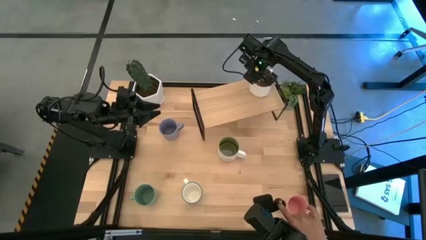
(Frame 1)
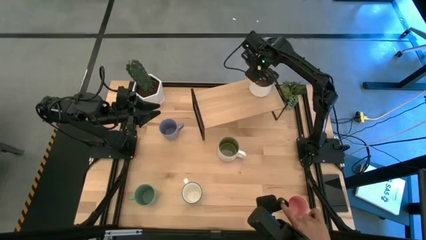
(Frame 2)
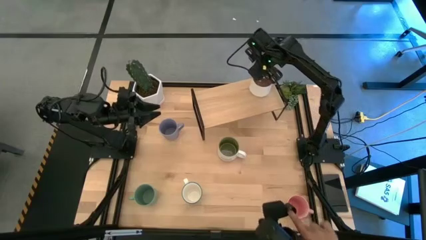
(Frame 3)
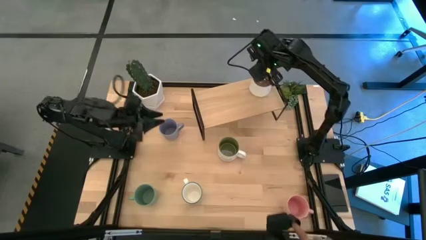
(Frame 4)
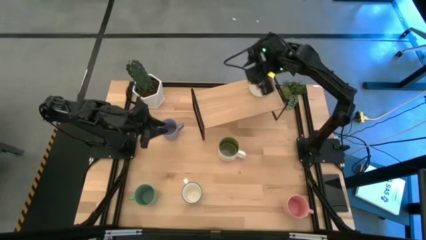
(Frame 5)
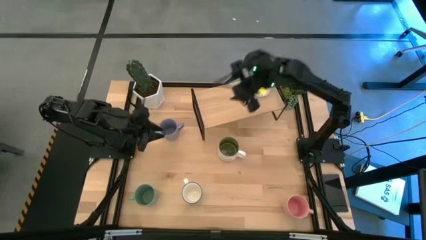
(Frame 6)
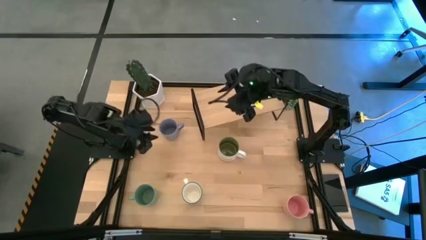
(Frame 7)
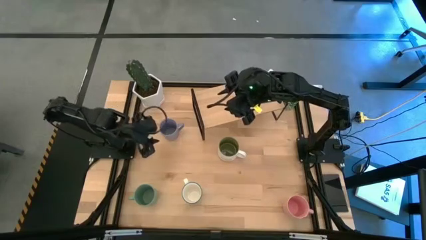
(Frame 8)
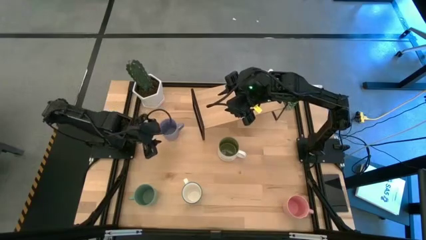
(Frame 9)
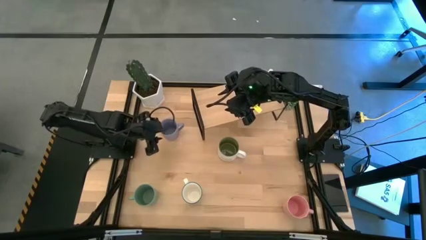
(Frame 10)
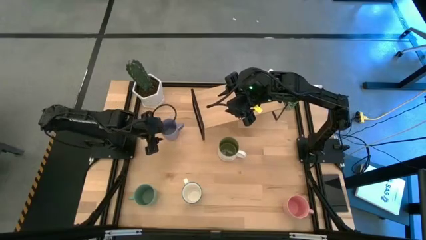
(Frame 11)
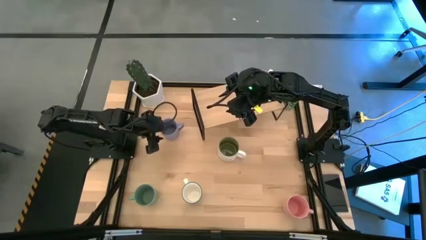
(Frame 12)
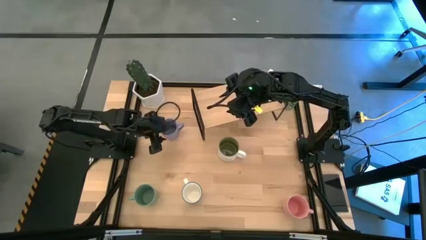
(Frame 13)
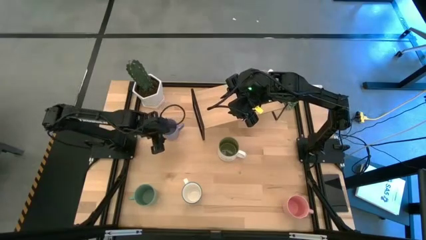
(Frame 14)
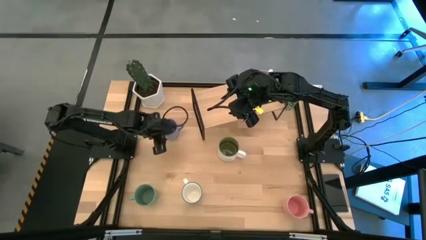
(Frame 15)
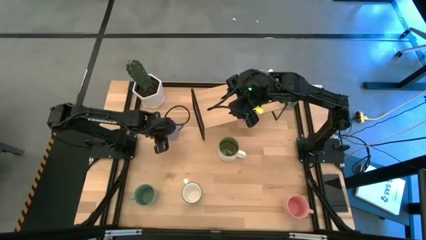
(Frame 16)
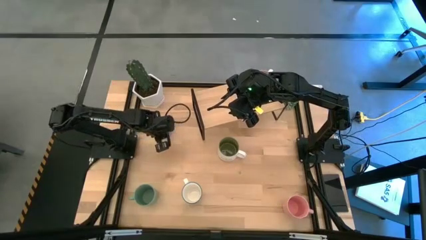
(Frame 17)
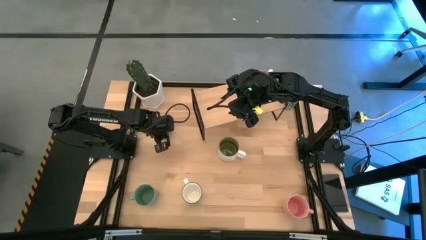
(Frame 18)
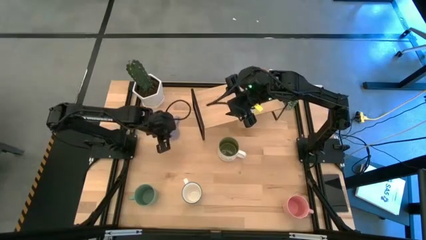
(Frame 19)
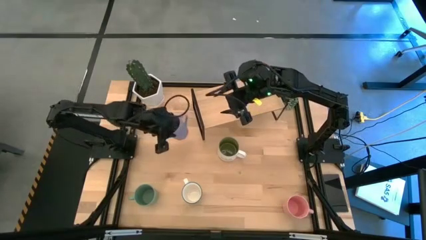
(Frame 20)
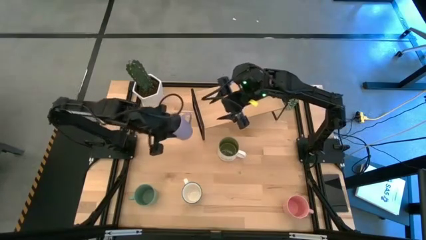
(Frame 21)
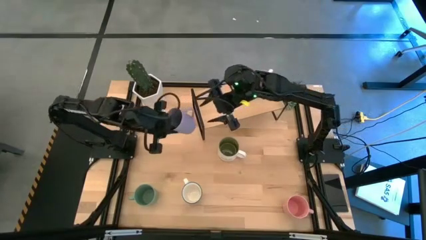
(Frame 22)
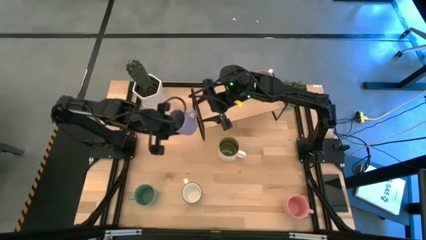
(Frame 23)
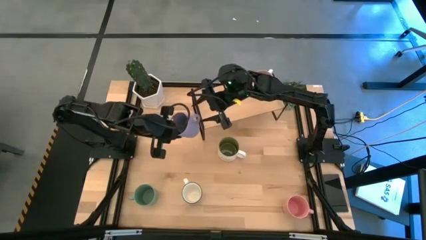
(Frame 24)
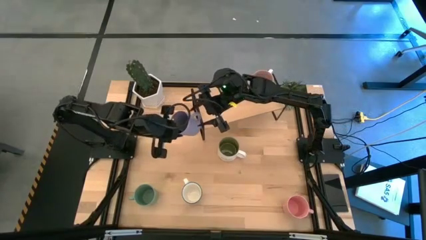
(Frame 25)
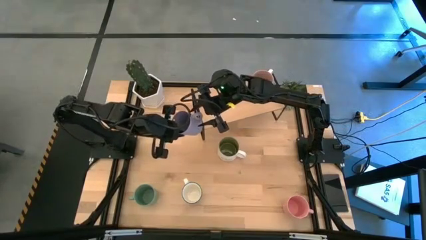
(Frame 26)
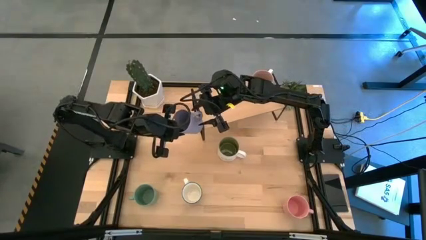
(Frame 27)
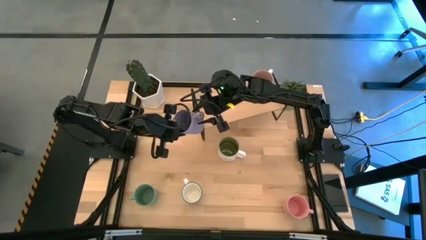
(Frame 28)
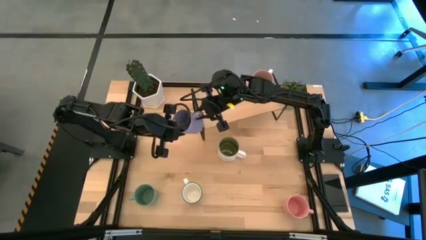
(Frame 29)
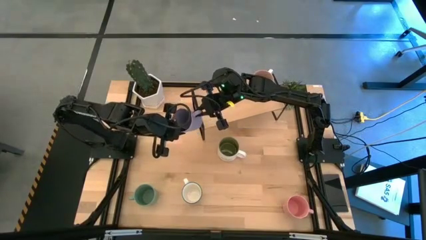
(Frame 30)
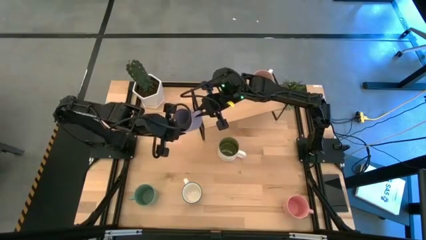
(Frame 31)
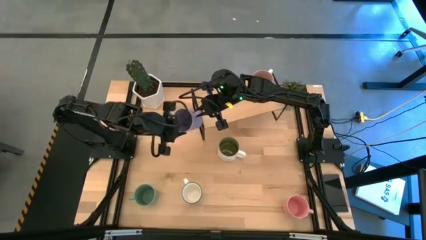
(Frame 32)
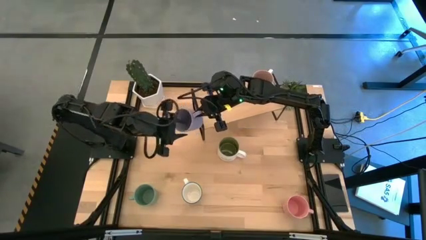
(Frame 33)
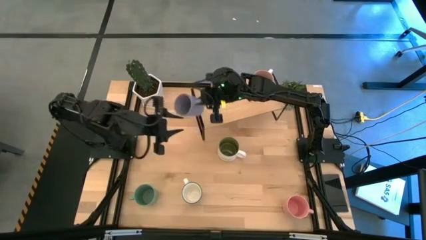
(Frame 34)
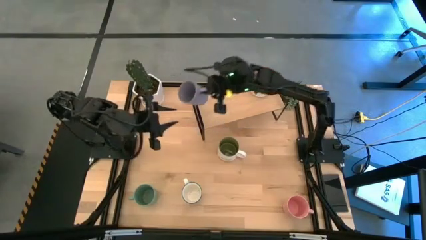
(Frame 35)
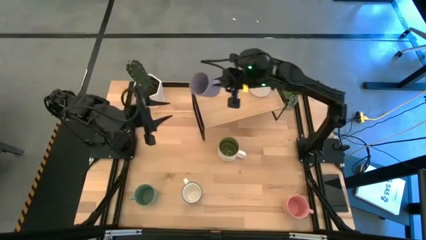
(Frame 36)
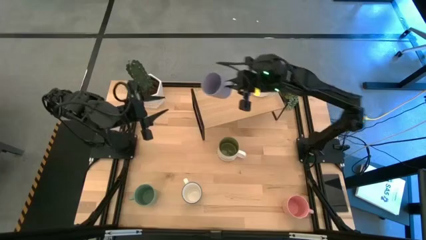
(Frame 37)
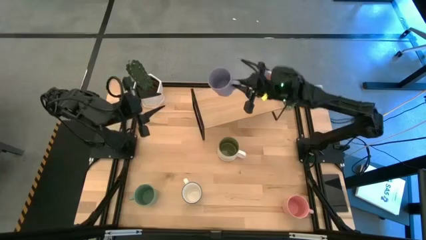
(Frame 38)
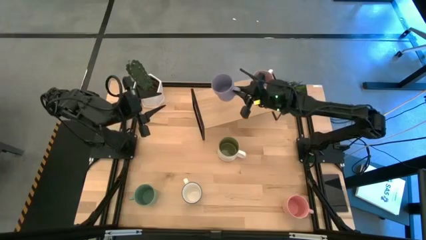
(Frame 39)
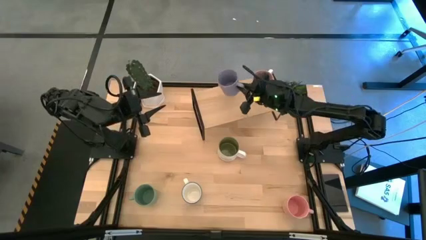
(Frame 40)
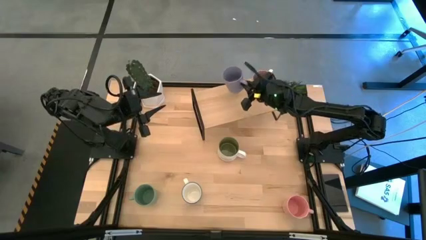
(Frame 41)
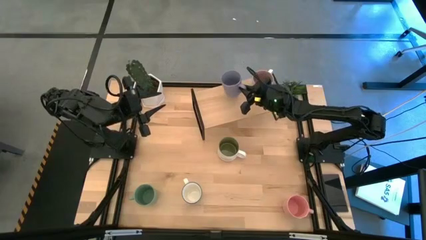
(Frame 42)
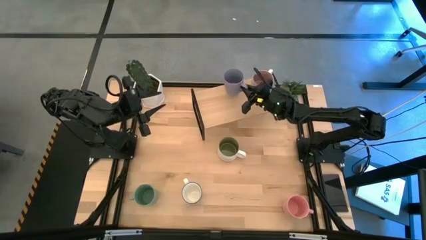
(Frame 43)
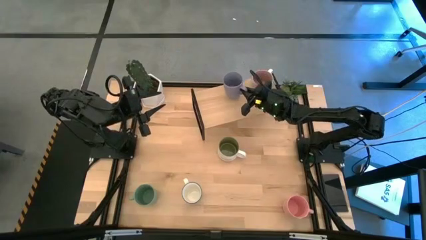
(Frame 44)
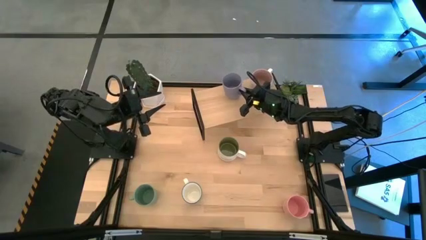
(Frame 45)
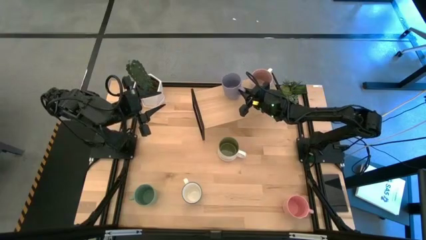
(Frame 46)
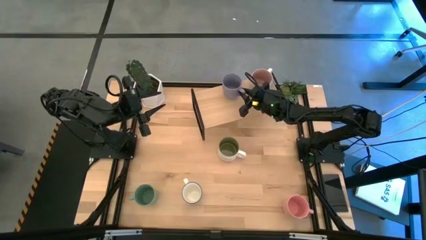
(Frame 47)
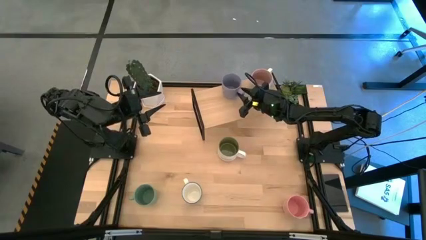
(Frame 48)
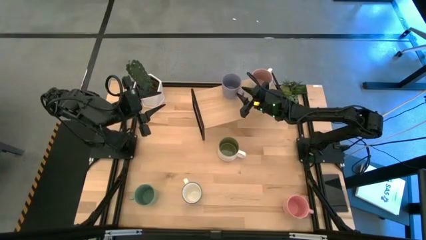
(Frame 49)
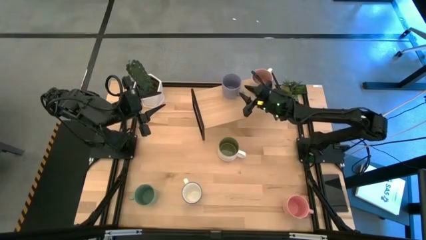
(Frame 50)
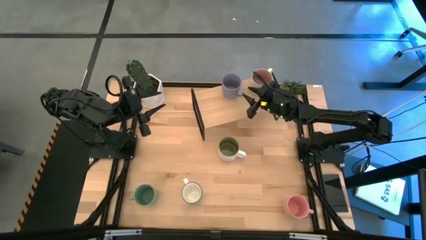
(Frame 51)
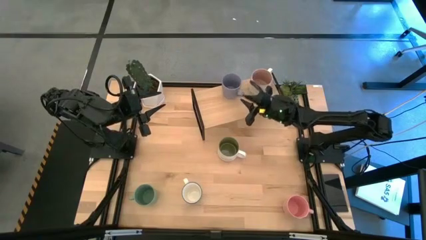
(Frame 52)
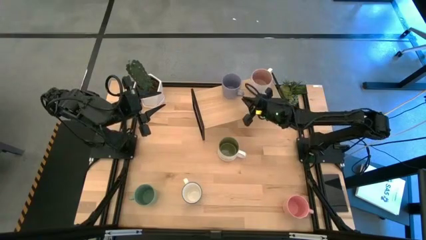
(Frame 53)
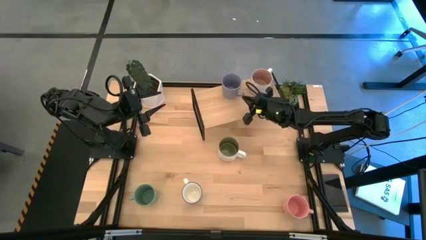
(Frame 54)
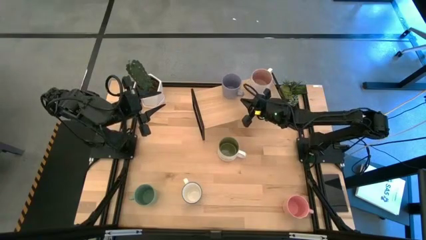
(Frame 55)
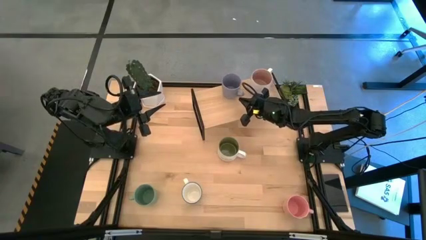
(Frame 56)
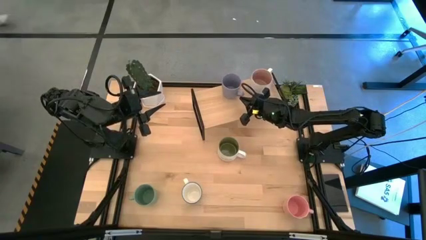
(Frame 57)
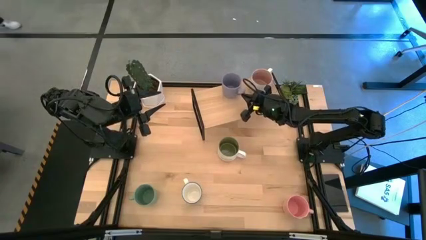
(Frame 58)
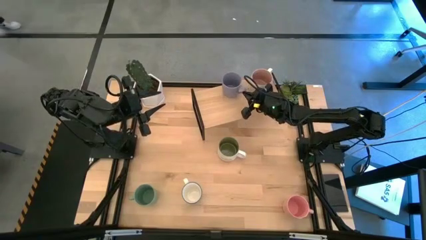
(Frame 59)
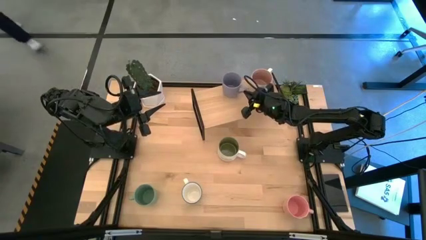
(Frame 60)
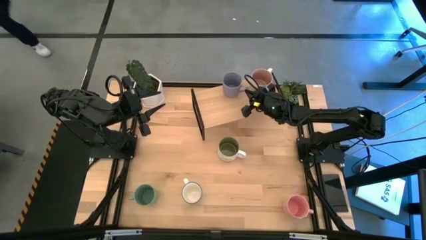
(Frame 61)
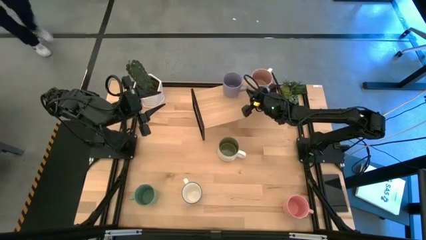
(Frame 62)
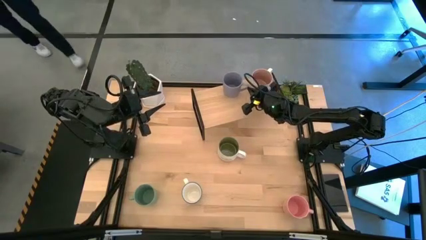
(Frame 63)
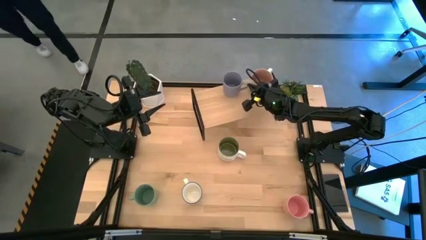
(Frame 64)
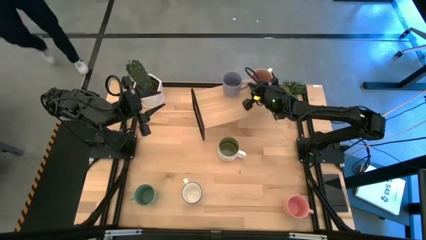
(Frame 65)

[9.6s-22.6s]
Task: Place coffee mugs
Put the purple mug on the shelf

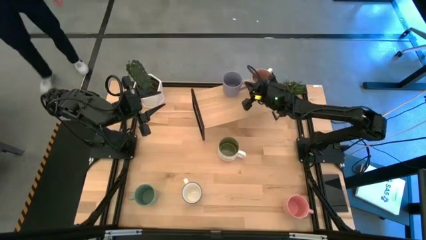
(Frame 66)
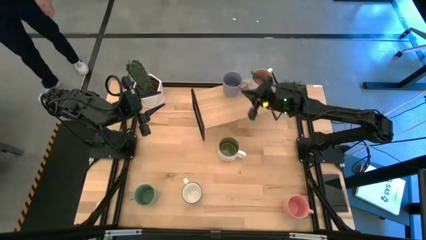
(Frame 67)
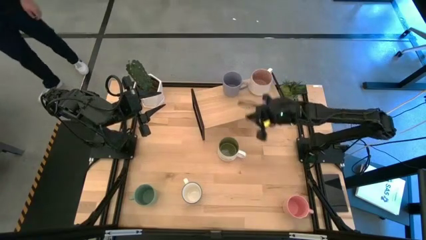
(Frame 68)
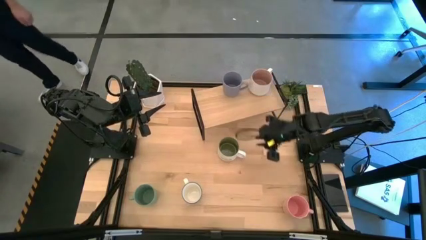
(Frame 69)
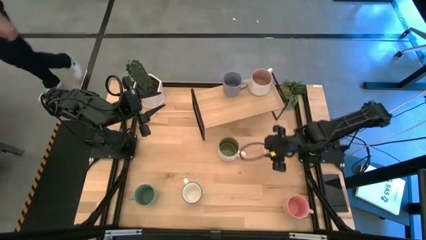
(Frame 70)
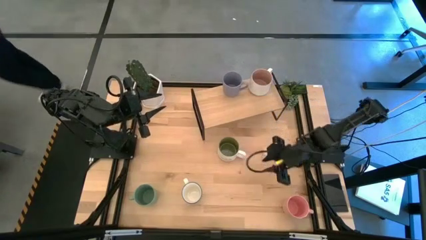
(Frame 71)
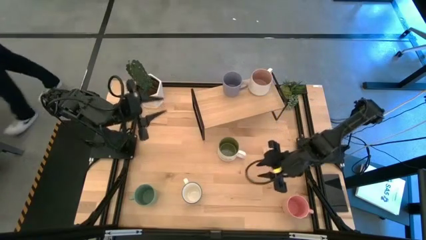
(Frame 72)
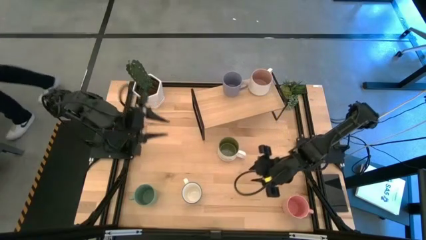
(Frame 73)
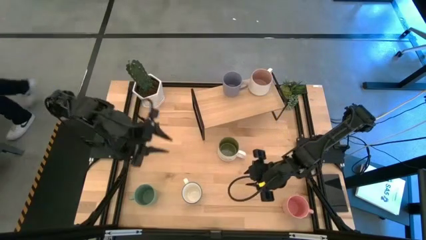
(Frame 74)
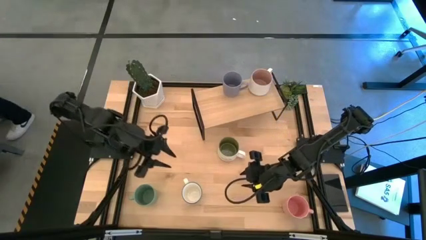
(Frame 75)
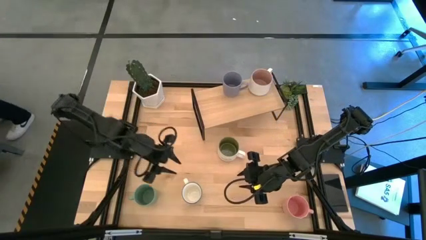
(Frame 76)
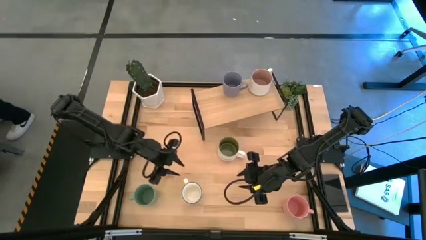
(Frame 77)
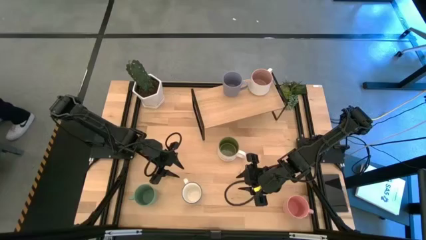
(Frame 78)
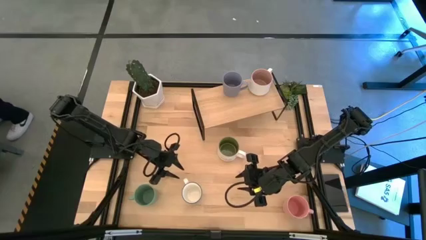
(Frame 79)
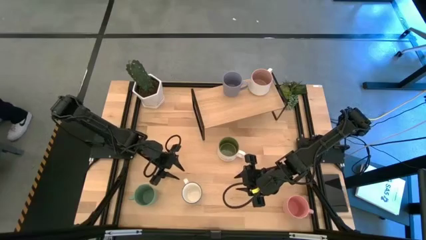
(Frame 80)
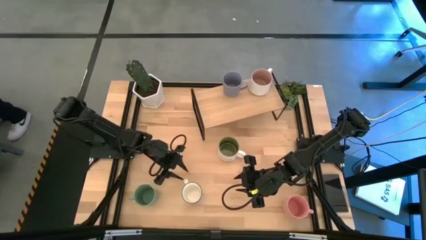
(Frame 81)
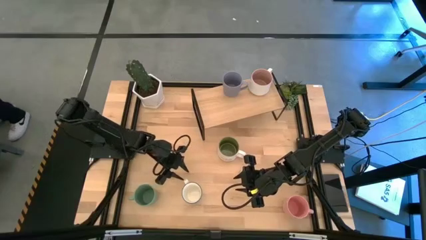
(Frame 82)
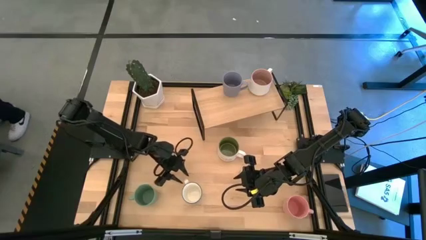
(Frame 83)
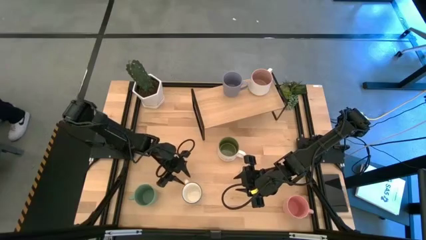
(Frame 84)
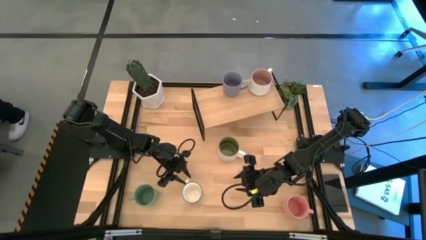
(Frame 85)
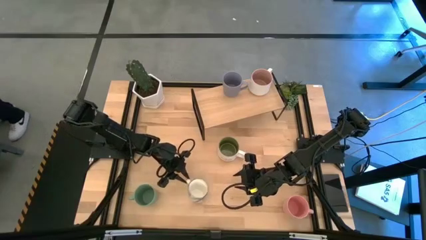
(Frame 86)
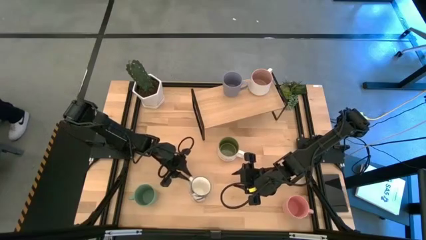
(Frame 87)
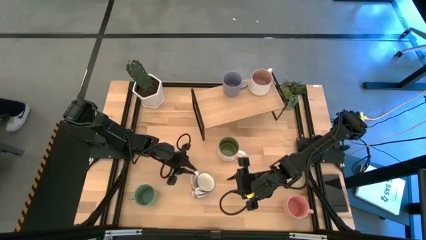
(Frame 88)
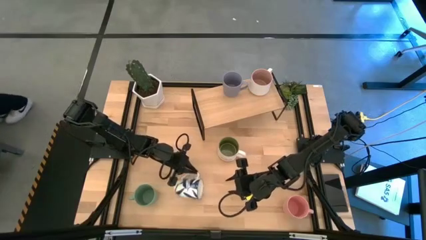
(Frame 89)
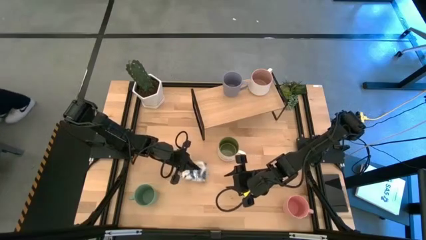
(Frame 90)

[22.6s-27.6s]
Put the blue pattern mug on the shelf
